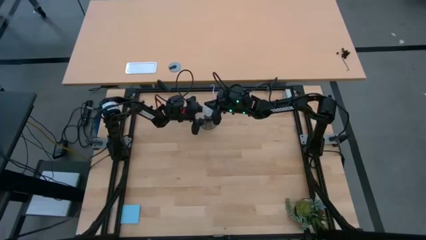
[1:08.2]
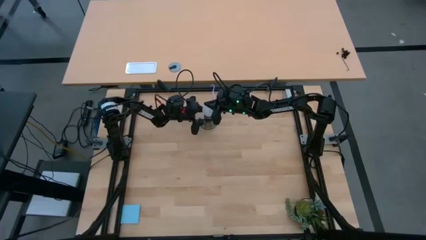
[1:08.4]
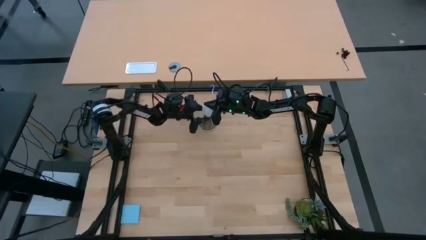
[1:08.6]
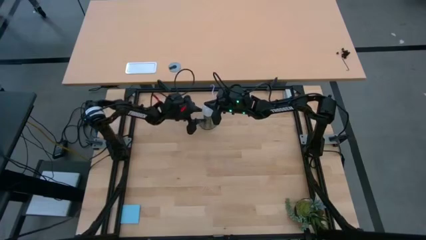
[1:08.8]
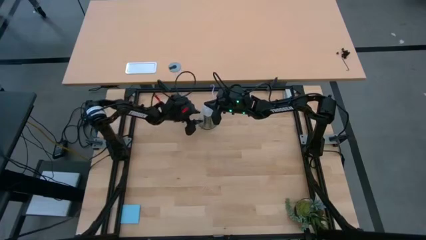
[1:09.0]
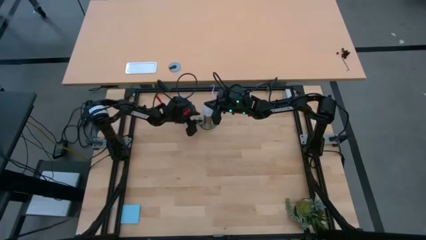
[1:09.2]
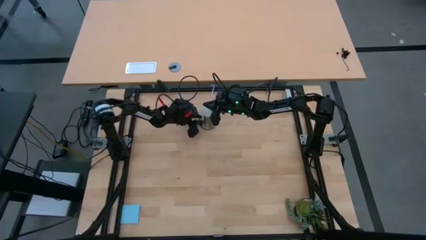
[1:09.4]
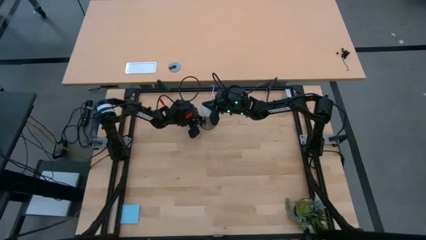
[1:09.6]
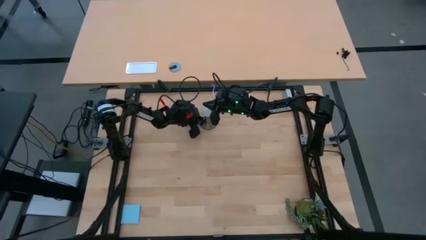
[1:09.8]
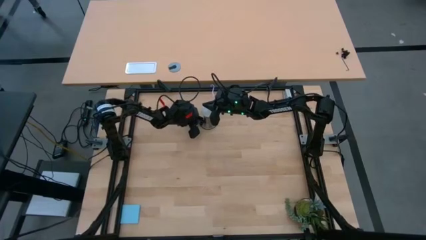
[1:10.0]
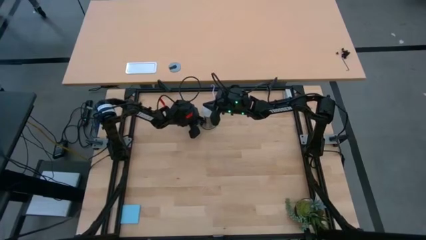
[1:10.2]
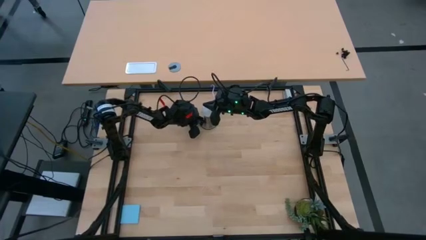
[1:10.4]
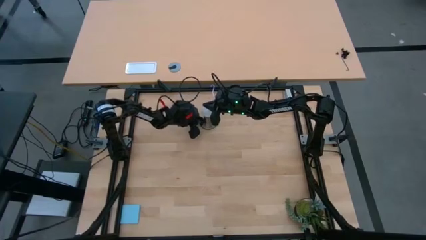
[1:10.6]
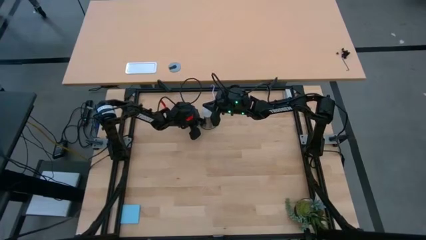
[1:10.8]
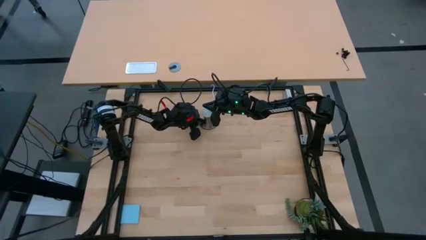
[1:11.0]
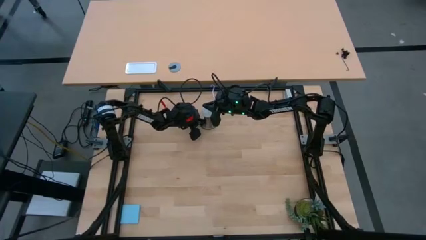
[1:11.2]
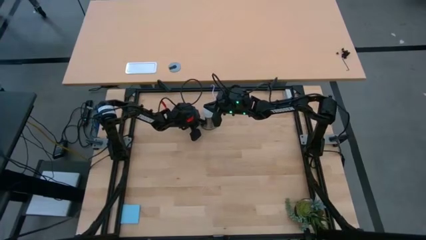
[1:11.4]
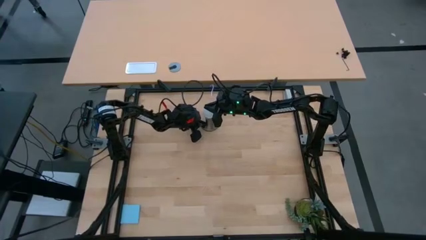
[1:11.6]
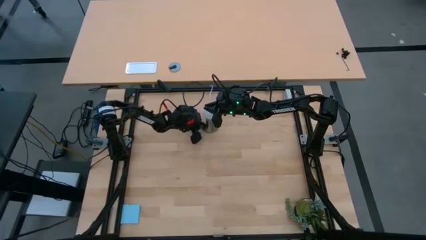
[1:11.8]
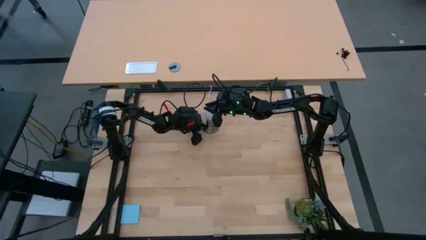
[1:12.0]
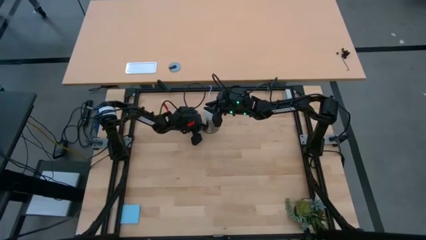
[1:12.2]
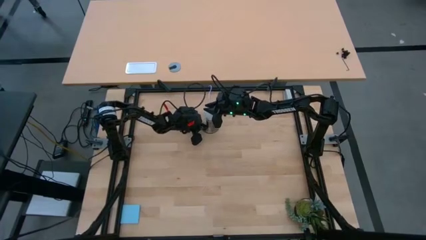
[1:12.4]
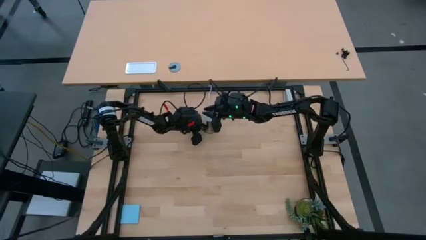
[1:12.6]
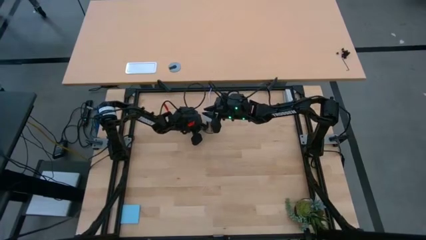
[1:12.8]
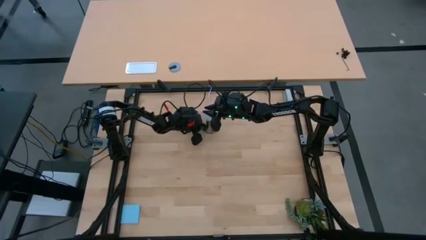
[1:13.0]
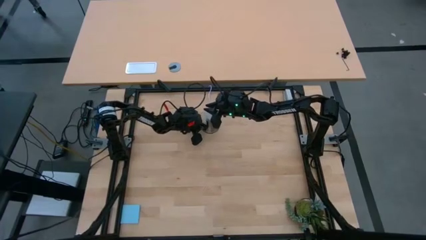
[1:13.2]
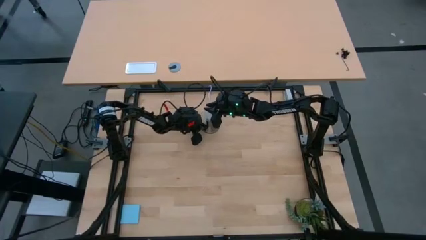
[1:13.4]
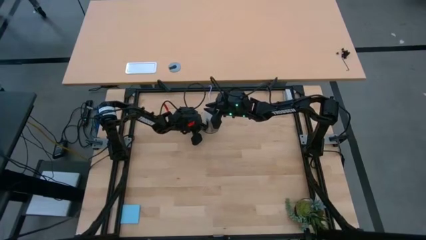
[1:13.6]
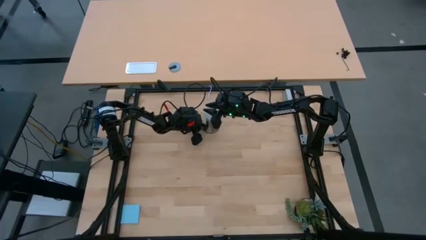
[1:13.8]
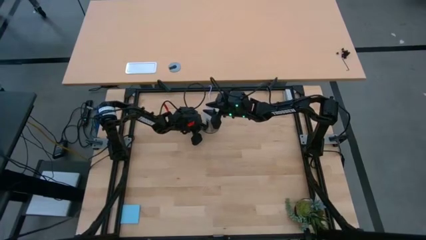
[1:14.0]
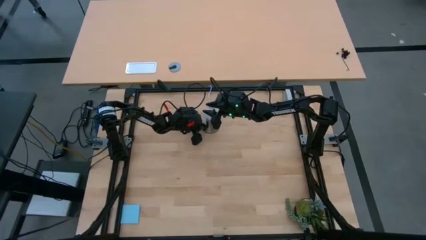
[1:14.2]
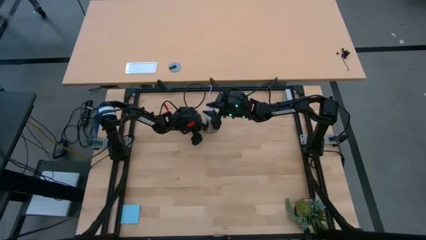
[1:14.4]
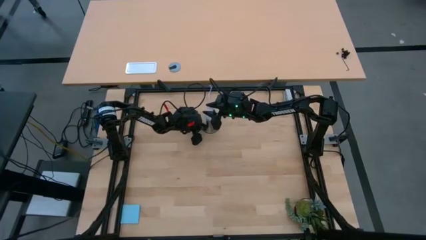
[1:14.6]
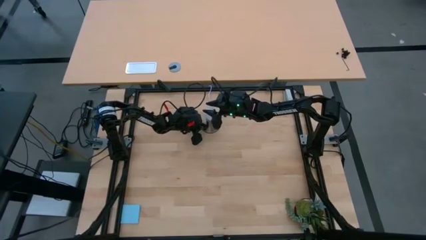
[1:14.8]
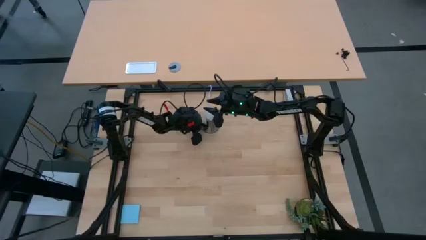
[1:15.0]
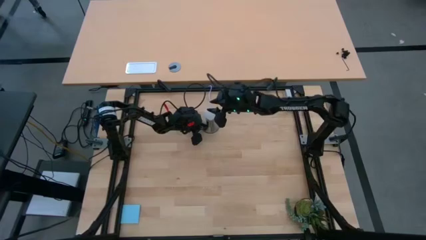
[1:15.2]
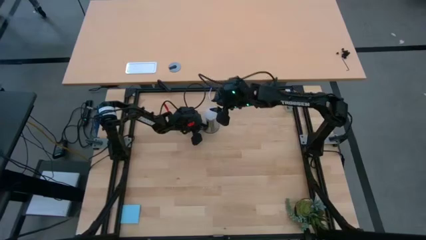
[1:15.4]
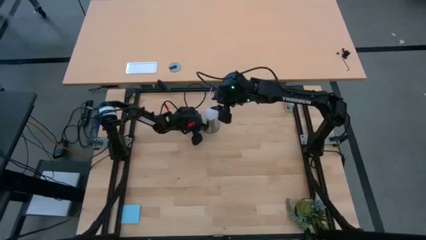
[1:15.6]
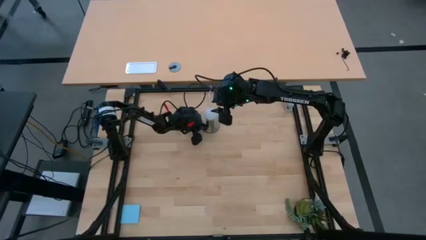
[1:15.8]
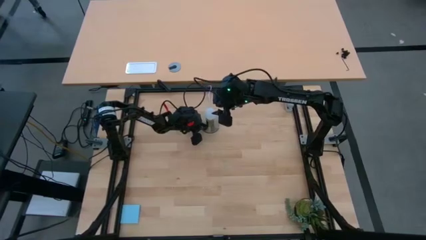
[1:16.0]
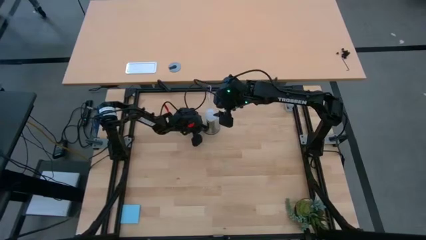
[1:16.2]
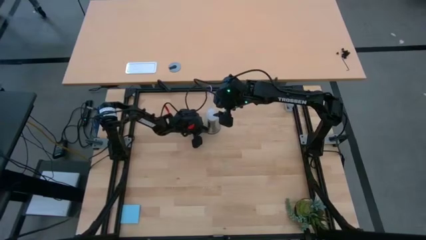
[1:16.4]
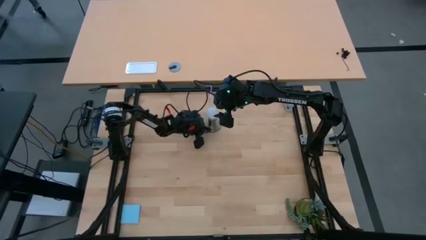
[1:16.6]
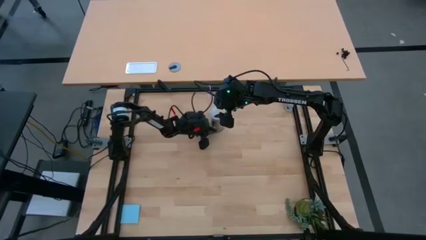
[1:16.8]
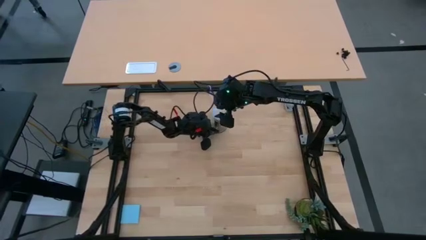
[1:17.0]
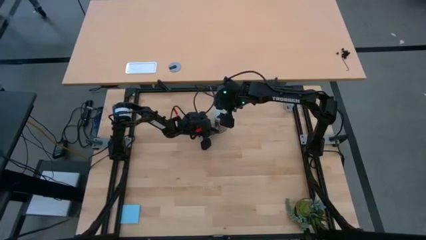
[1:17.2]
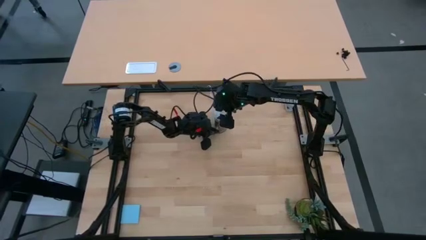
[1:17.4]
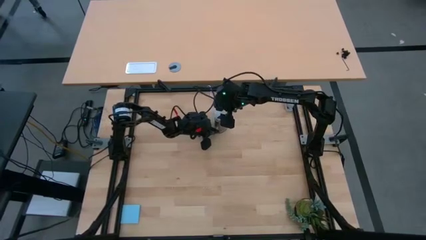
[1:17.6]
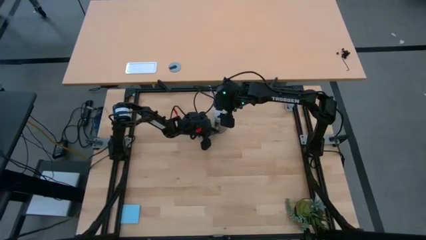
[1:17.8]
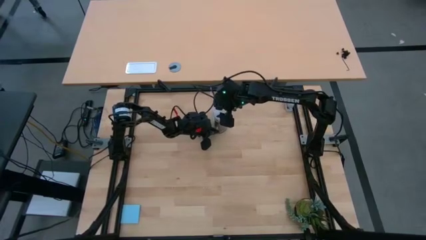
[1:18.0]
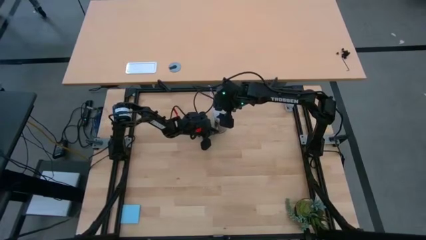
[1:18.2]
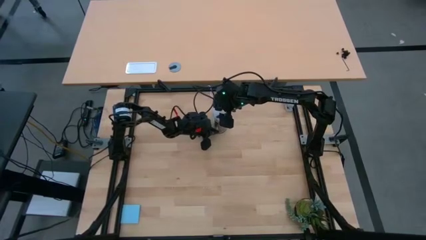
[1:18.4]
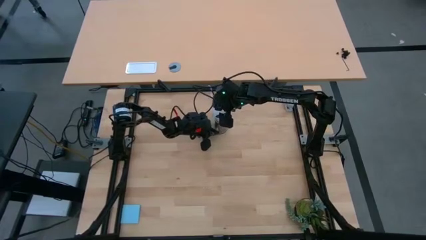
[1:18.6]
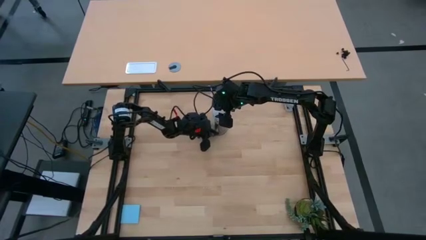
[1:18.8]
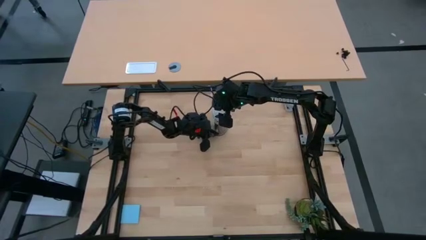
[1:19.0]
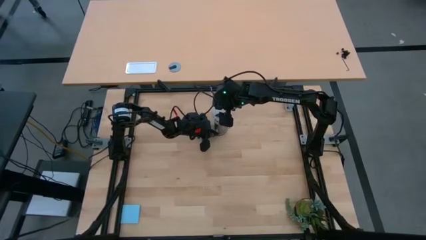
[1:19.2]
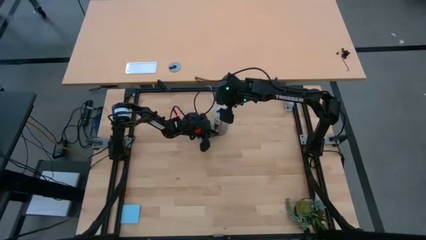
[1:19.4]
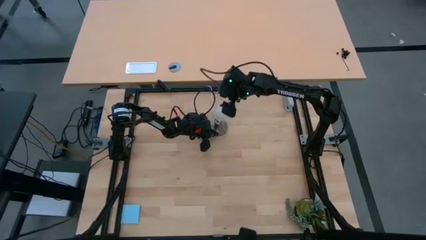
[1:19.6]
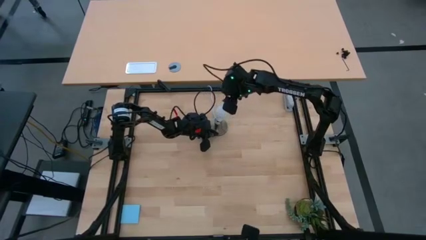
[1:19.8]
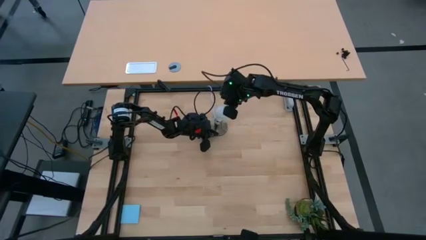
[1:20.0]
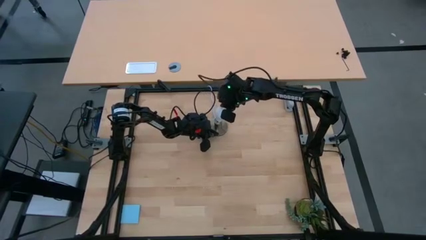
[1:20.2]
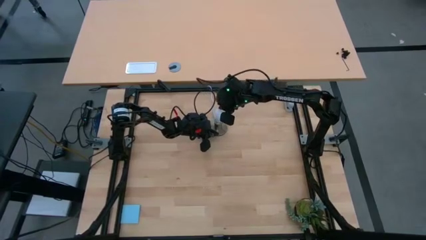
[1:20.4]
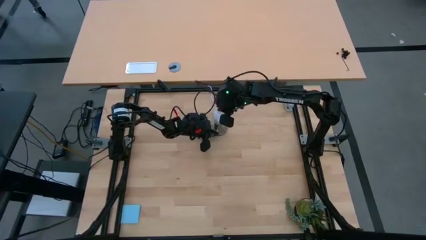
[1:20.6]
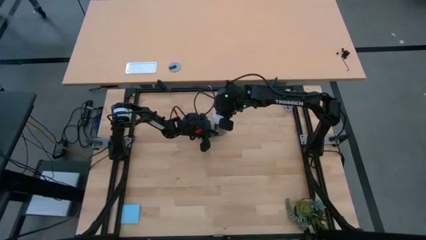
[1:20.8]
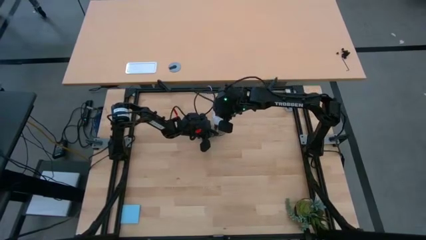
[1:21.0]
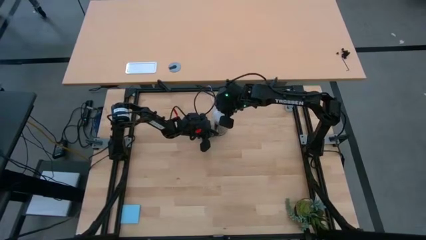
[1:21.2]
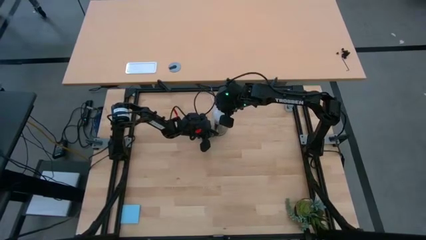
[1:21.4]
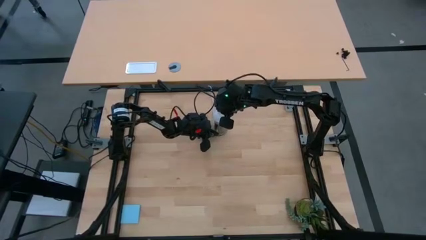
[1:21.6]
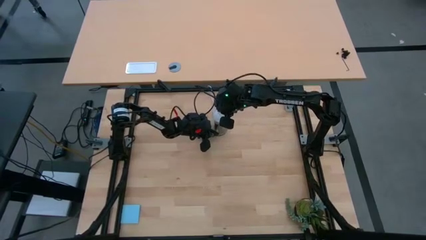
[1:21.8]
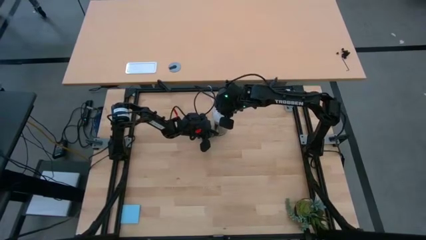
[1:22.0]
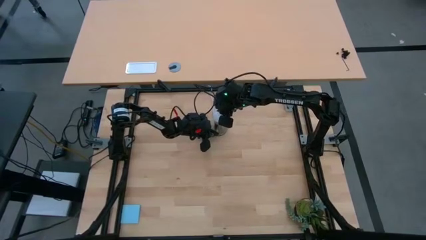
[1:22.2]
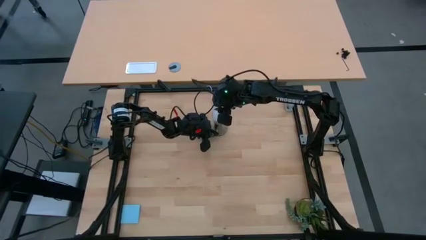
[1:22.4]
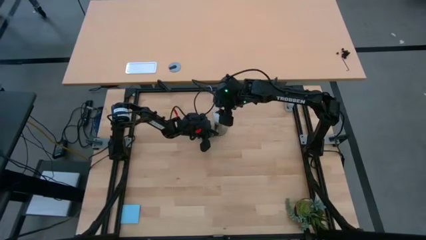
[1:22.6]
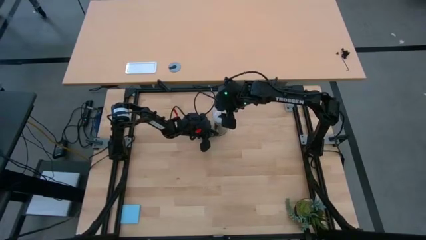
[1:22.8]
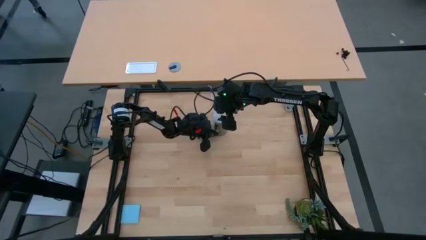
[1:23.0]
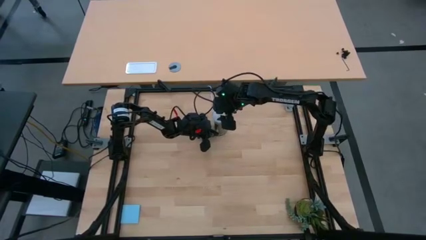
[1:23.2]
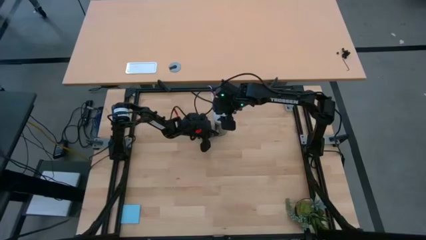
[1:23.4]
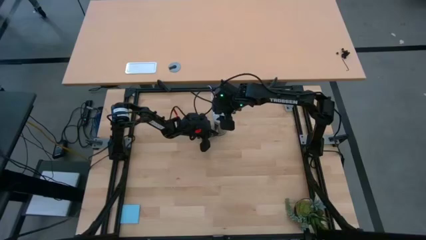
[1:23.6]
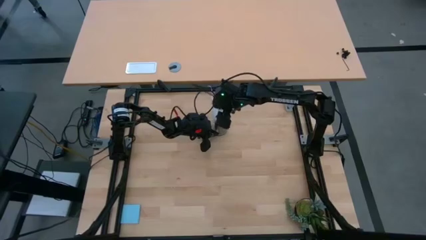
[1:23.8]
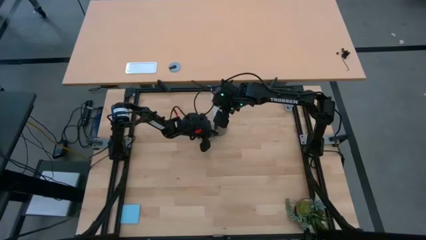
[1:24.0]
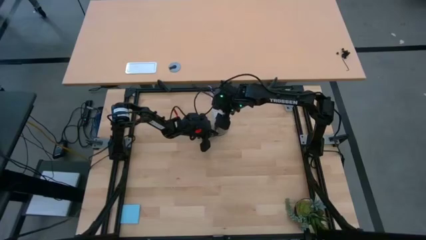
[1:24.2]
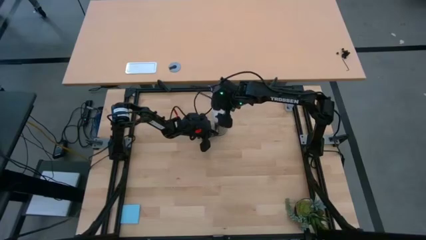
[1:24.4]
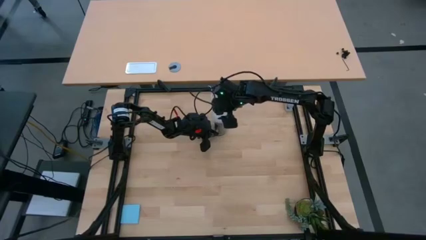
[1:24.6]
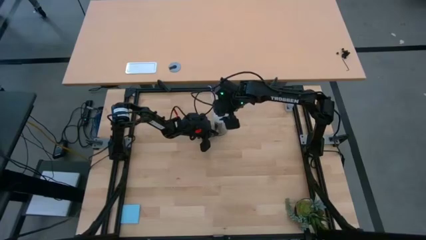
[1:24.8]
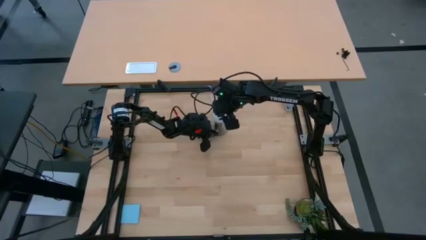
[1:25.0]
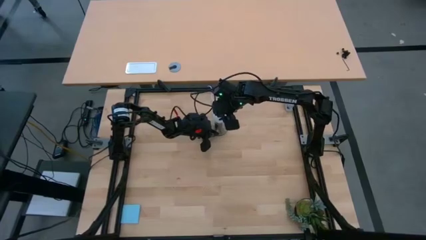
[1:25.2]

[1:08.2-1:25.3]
Task: Screw lightbulb
Insert the light bulb into the table lamp holder
